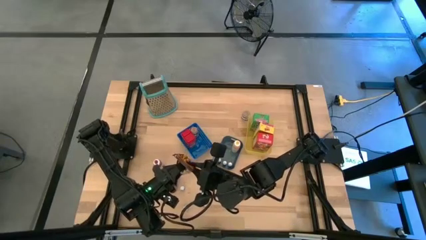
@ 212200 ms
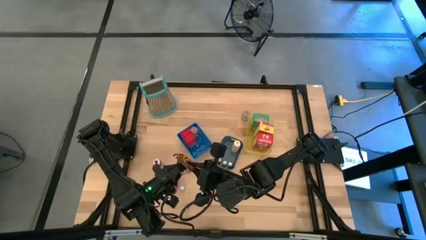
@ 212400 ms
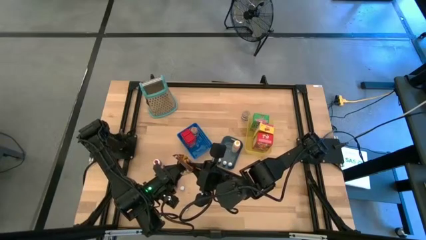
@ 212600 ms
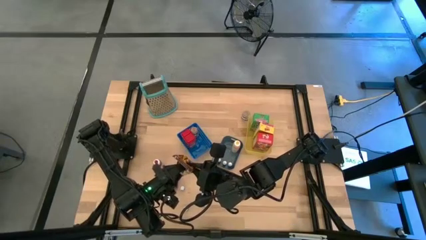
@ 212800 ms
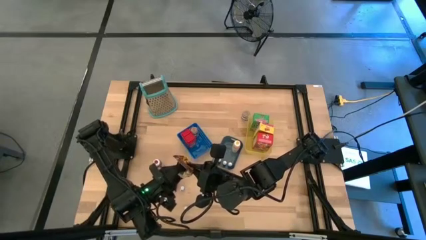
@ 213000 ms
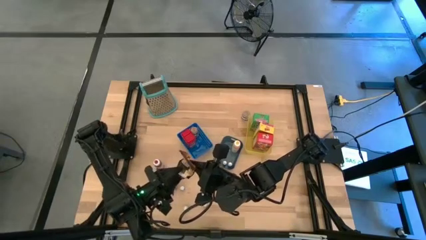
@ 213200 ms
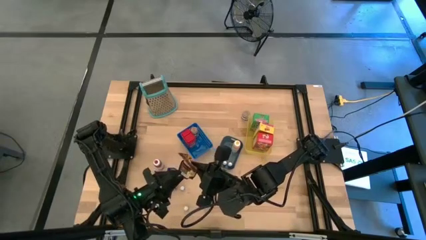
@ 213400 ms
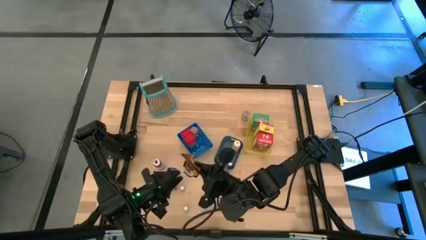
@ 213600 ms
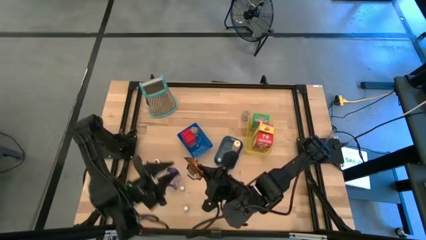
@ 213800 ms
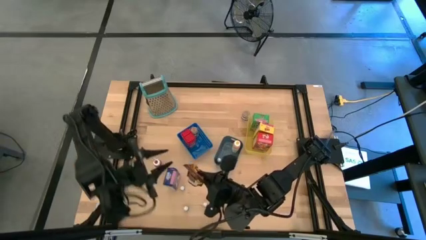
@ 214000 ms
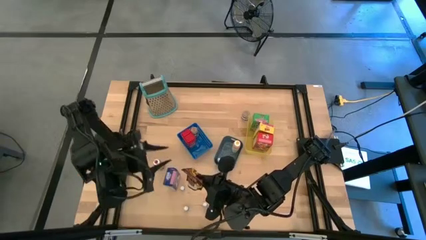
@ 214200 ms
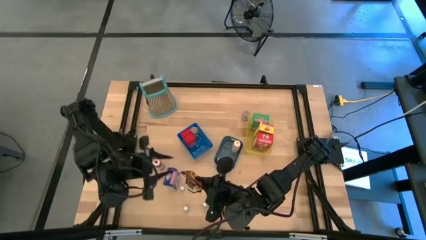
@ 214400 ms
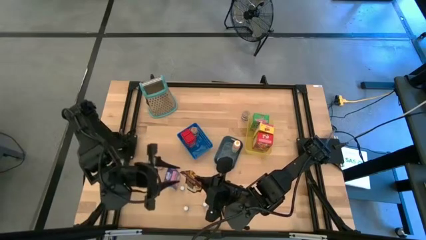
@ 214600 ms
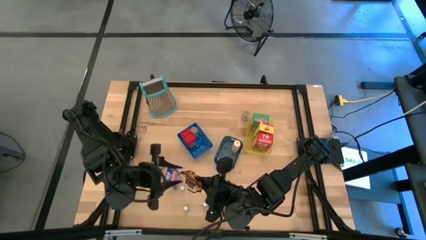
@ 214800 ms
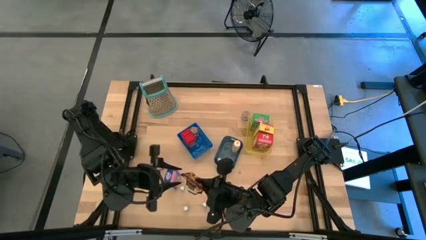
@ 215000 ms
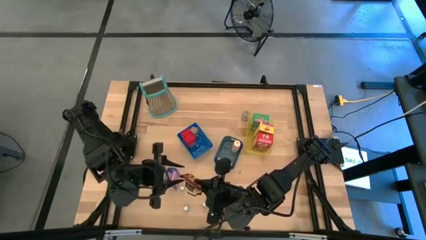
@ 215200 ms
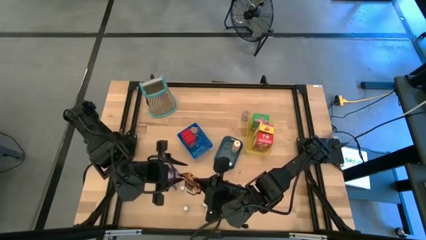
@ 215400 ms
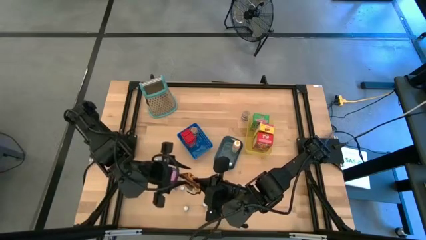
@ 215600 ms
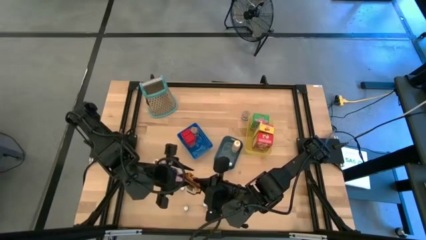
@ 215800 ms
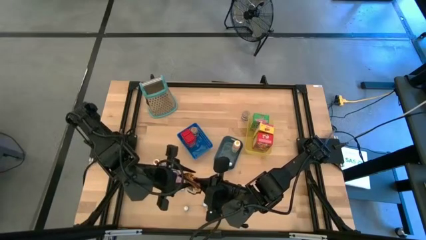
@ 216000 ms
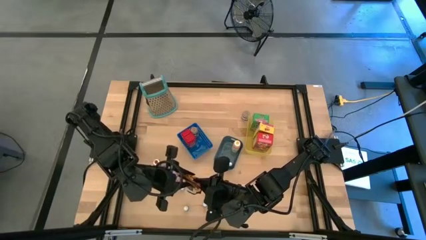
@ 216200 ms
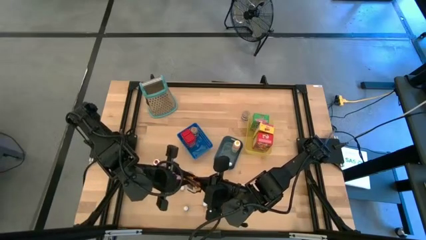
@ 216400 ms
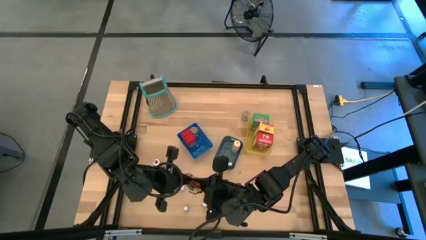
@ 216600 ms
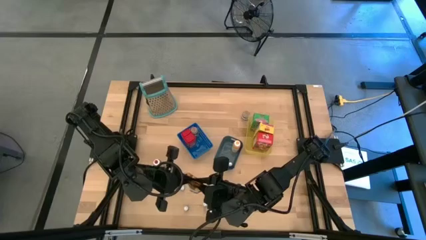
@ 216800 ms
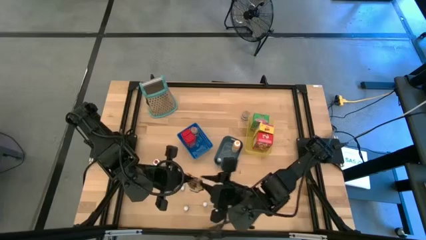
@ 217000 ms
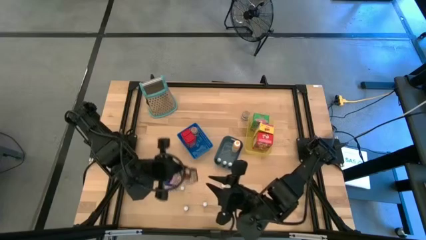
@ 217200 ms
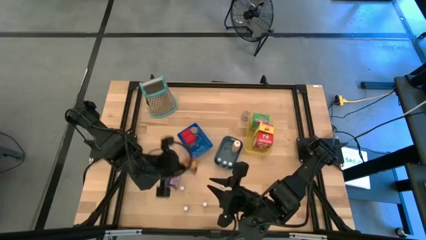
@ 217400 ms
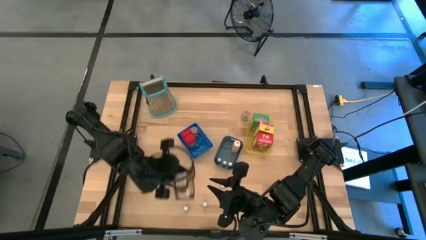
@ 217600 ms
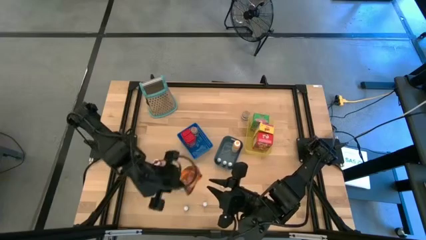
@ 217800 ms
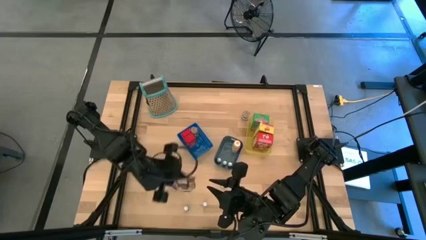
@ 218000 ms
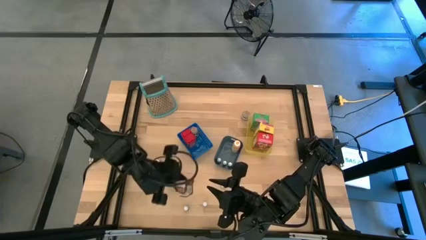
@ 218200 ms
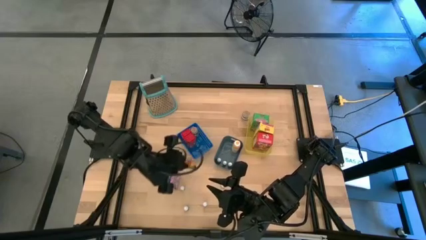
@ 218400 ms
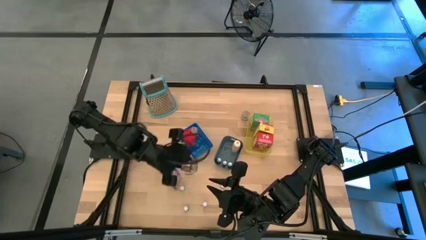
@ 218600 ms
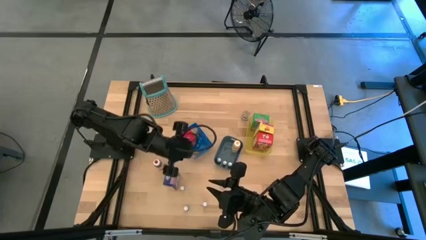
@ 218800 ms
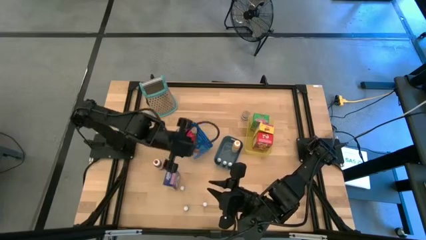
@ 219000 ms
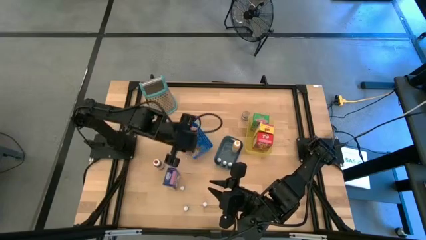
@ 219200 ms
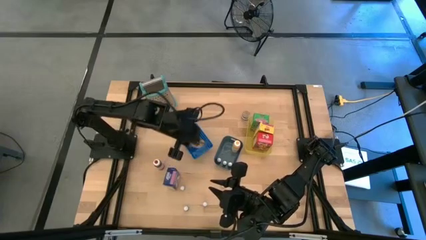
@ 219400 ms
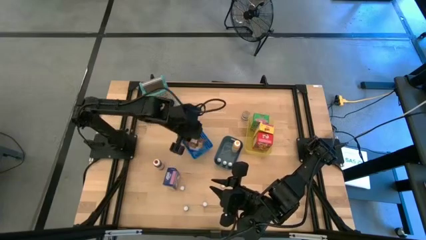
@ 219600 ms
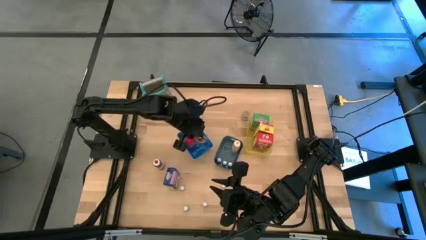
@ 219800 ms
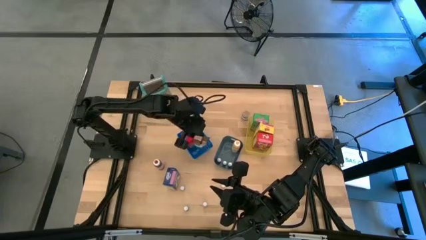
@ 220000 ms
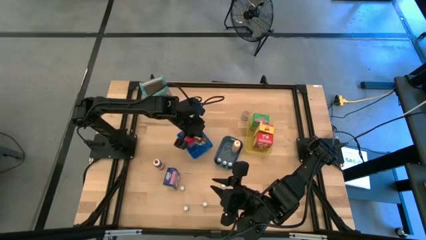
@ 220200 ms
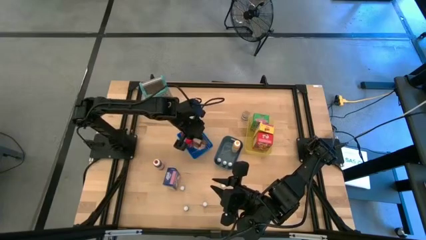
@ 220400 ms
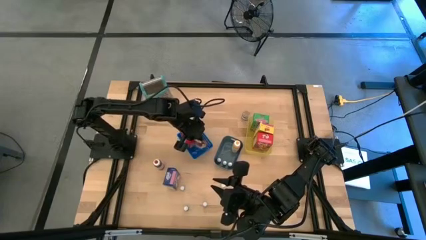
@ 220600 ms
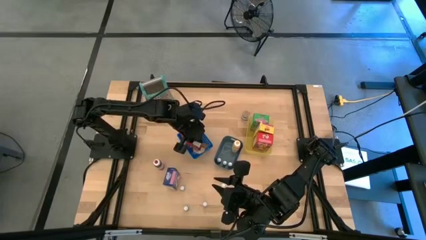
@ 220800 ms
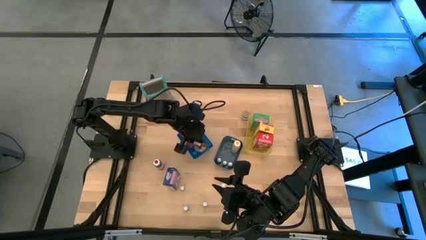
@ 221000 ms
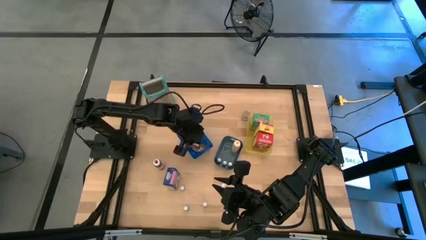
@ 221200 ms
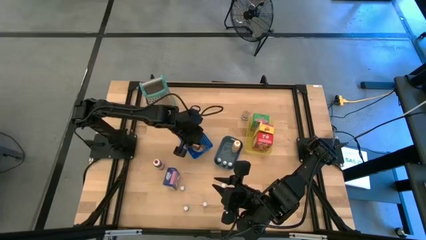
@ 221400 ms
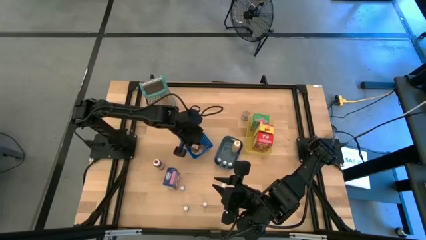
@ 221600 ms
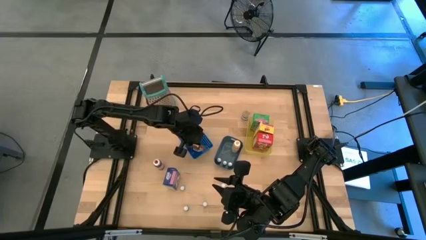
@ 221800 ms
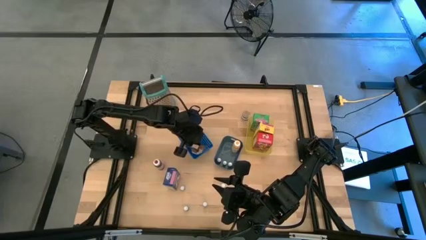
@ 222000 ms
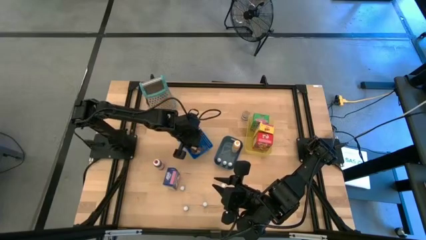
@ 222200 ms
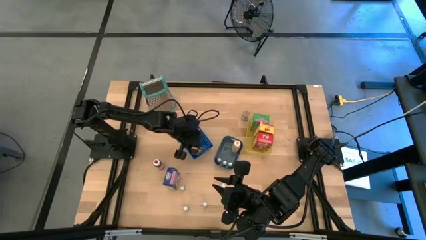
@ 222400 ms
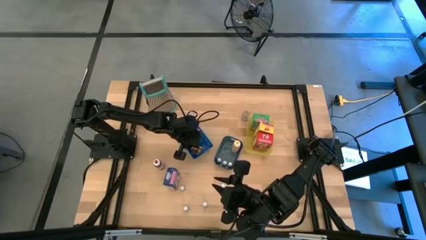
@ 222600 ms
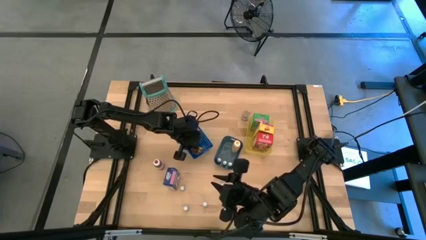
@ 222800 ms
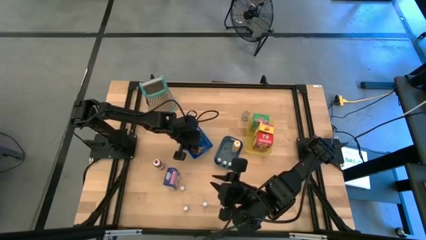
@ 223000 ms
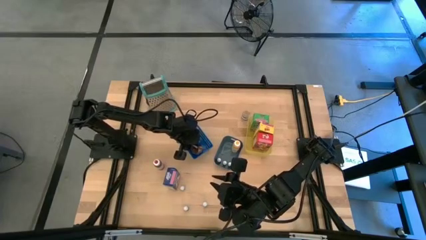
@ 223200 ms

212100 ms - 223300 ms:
Task: Pick & Place Kitchen Items
Put the orange seasoning pack into the blue bin
